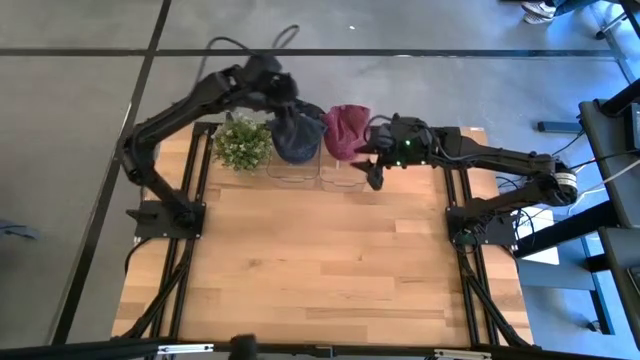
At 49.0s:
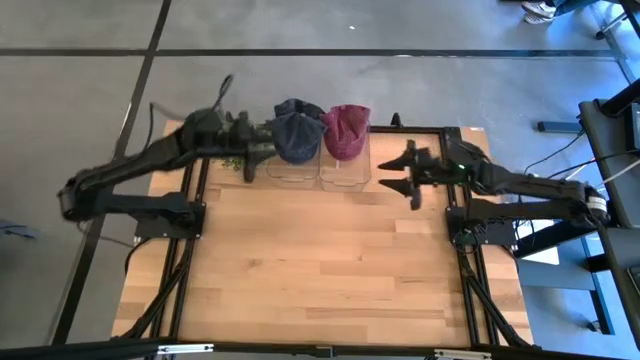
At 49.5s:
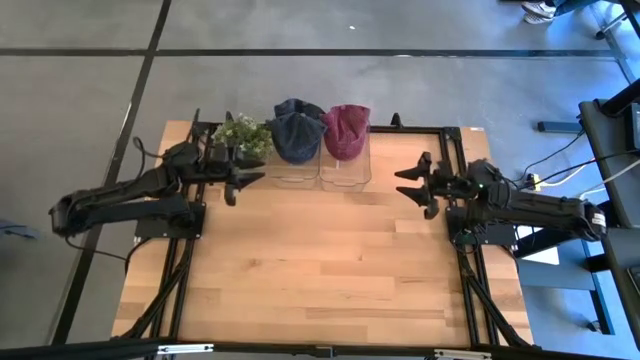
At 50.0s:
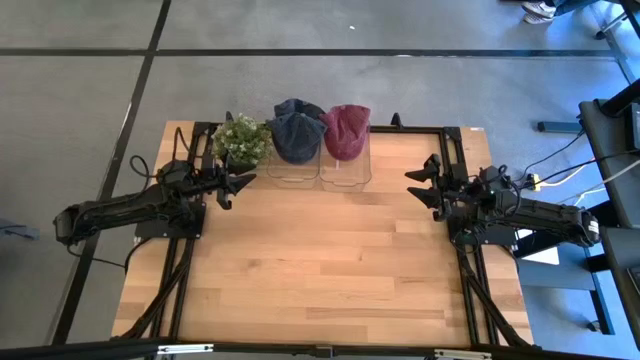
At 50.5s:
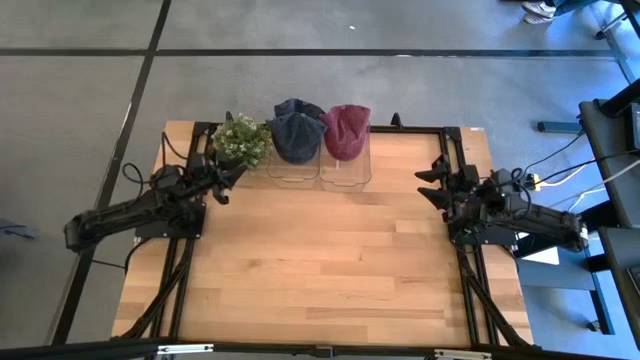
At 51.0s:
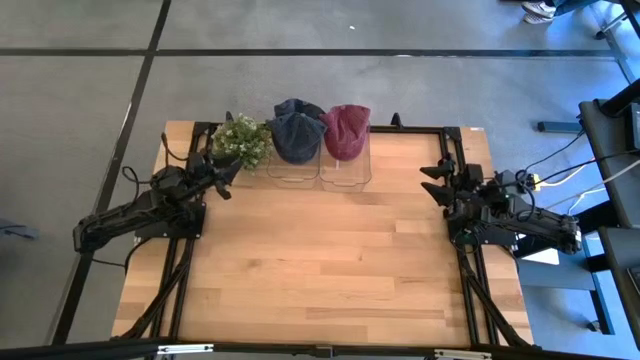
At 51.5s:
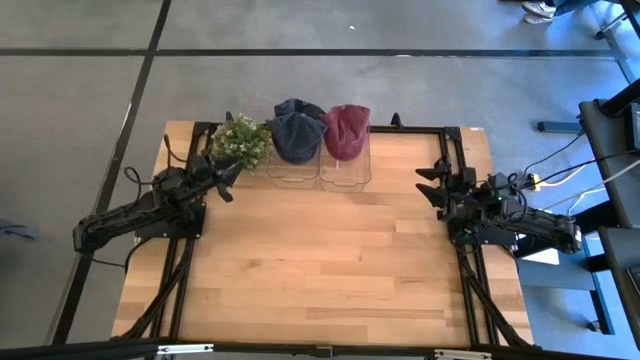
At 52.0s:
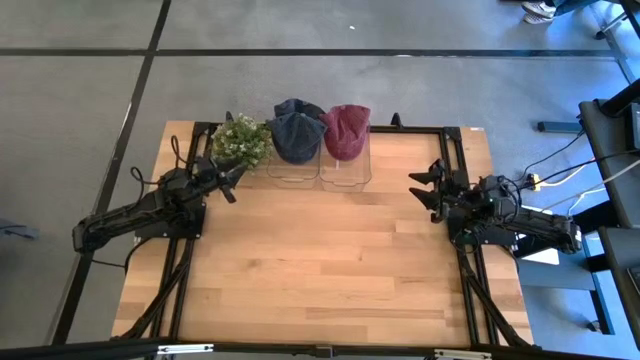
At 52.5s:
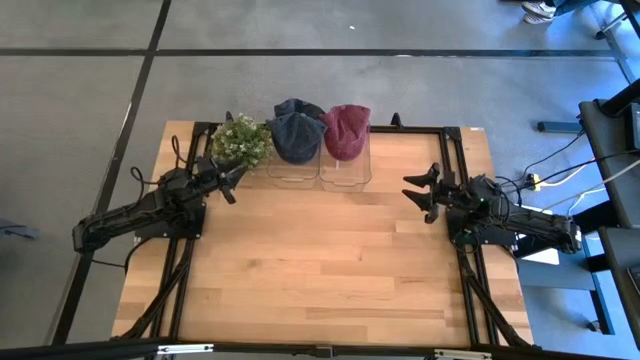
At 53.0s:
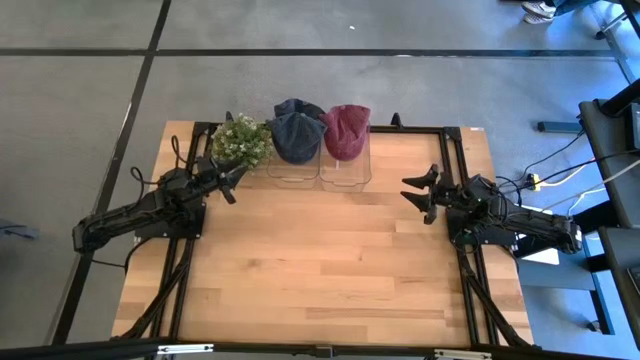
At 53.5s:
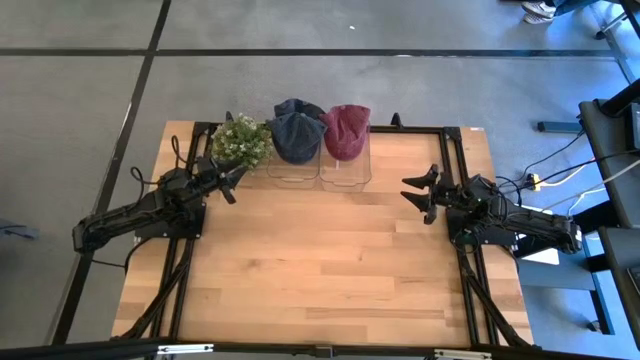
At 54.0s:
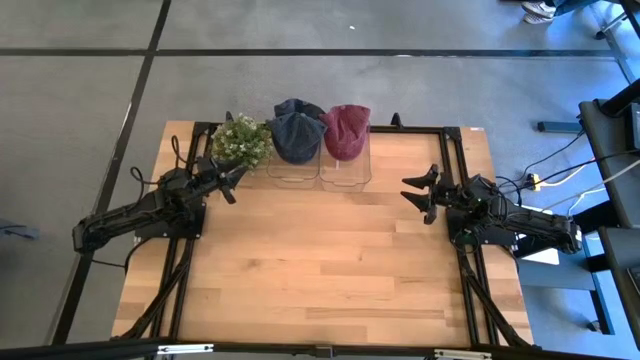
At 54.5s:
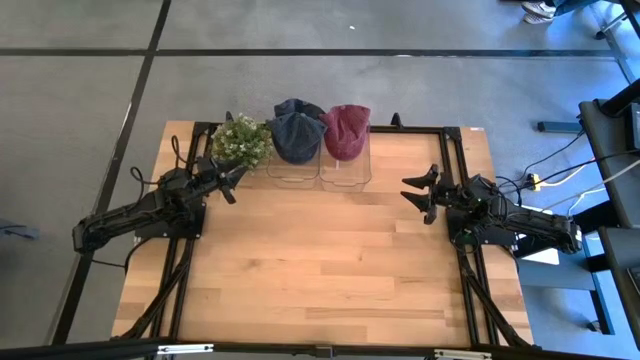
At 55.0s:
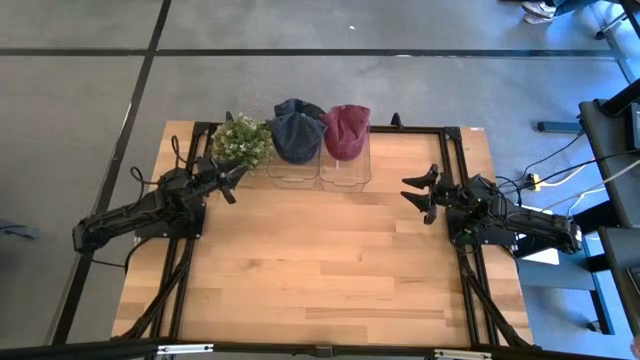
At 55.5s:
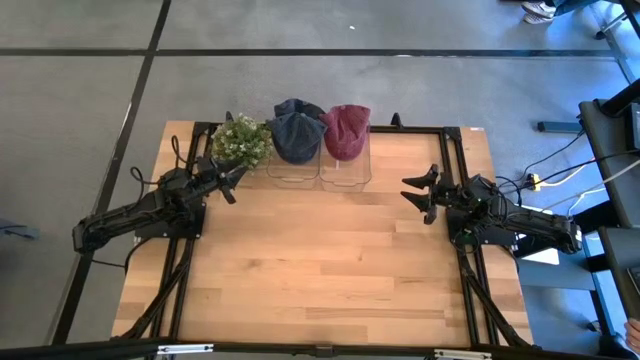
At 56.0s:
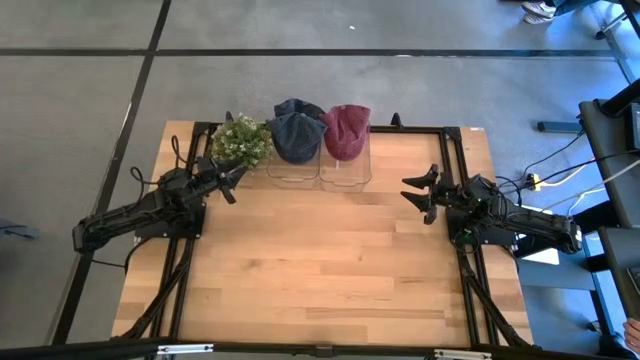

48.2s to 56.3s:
Task: Pick & Place hat
Return to Home Position

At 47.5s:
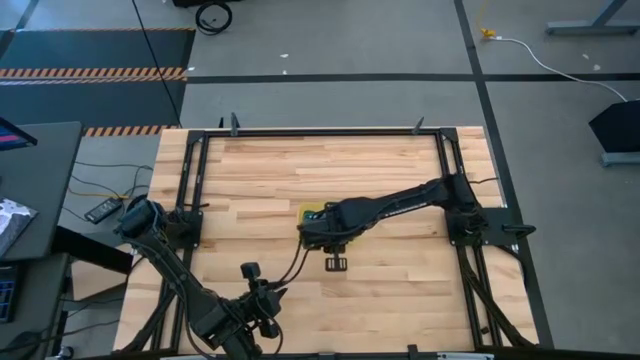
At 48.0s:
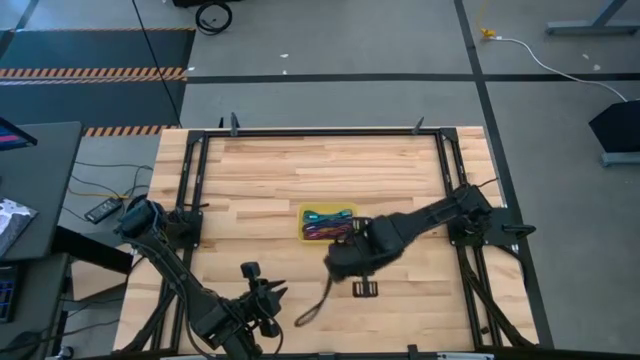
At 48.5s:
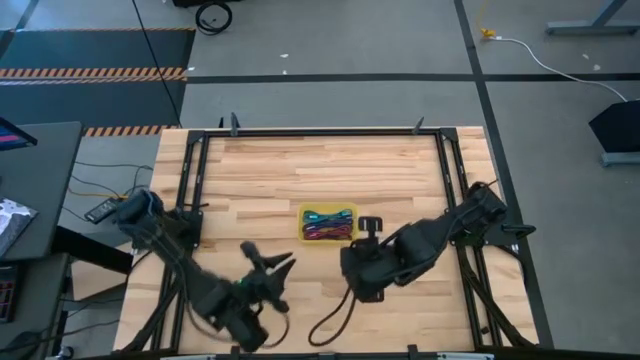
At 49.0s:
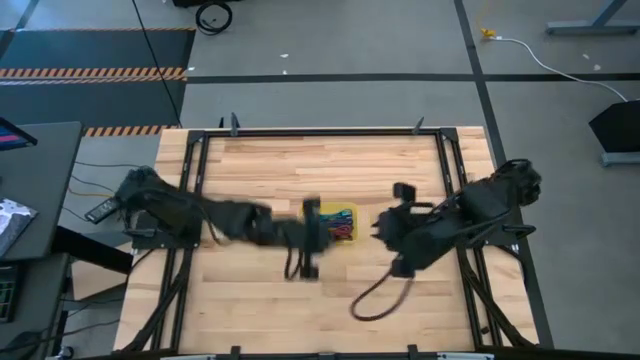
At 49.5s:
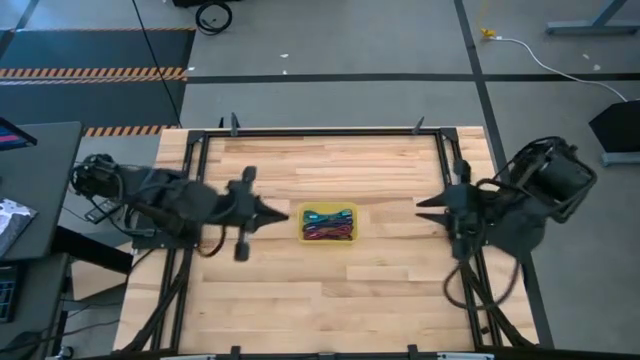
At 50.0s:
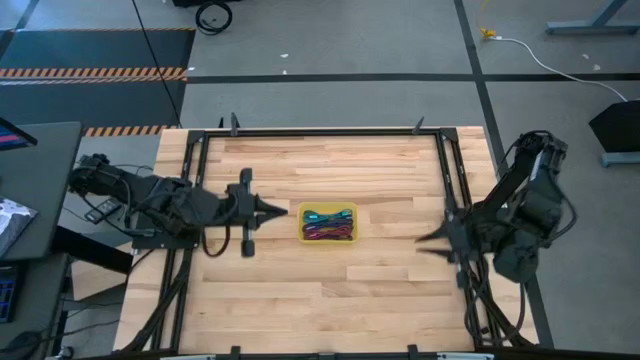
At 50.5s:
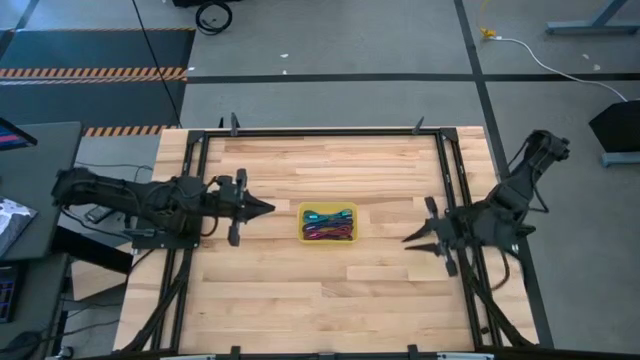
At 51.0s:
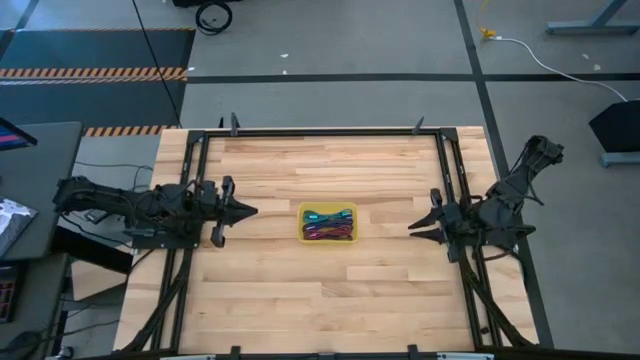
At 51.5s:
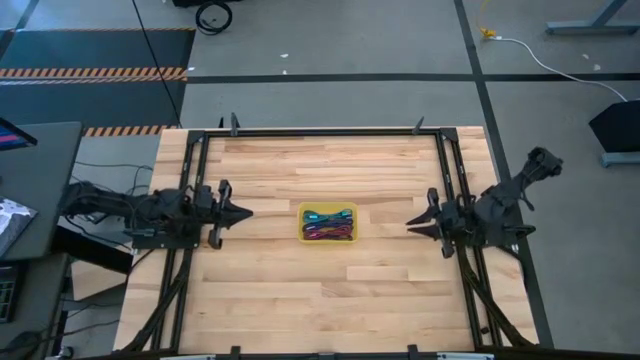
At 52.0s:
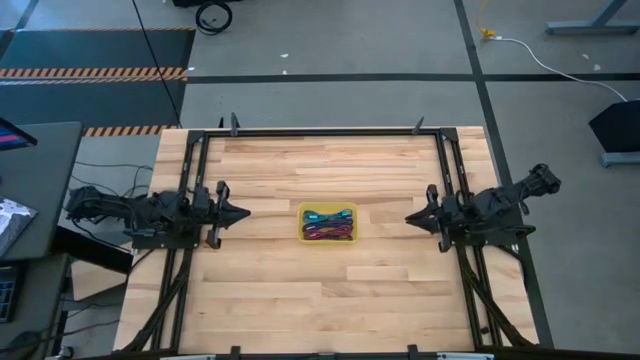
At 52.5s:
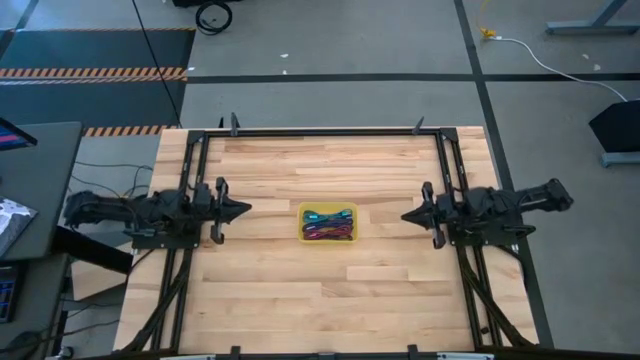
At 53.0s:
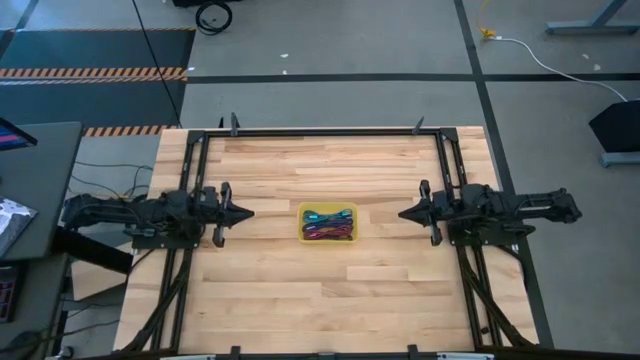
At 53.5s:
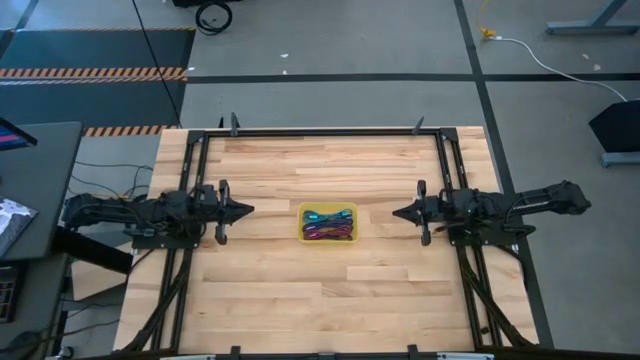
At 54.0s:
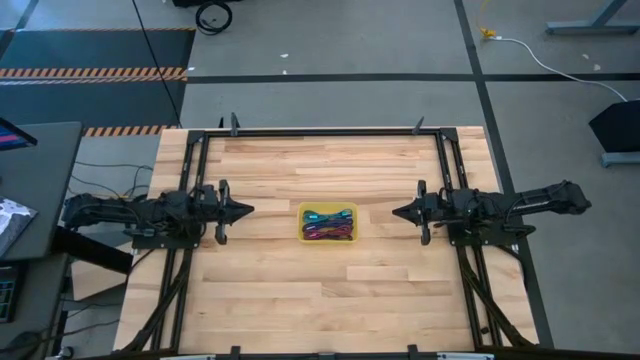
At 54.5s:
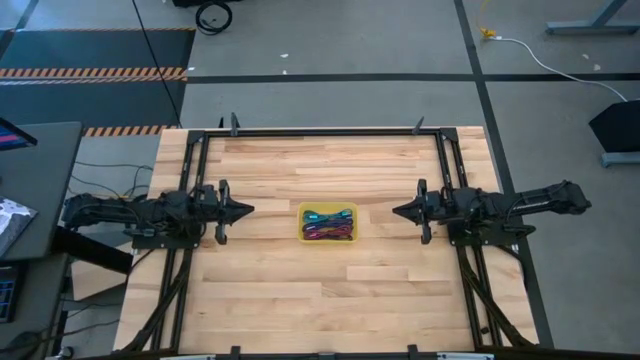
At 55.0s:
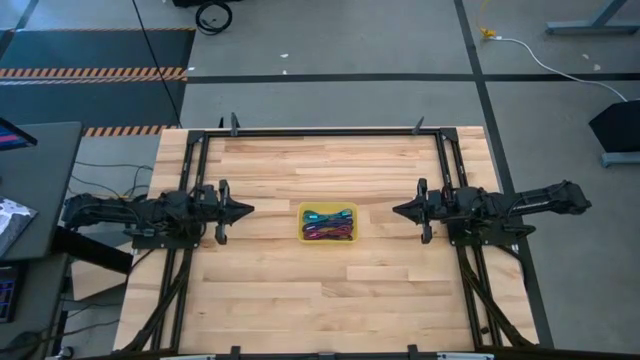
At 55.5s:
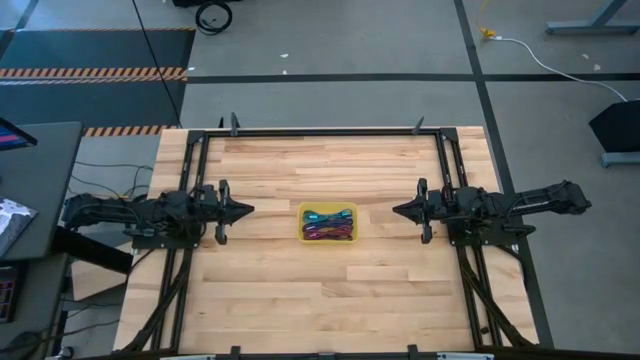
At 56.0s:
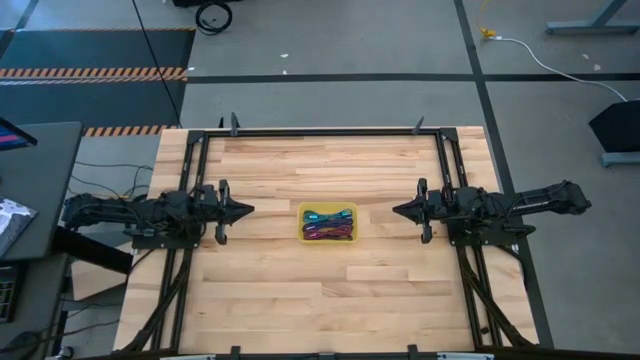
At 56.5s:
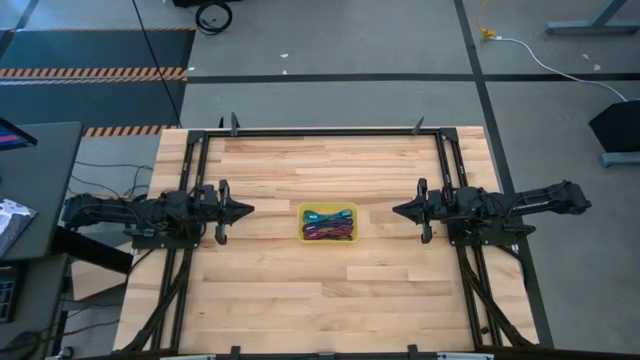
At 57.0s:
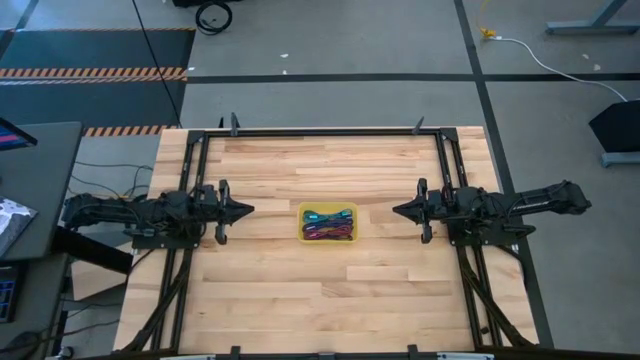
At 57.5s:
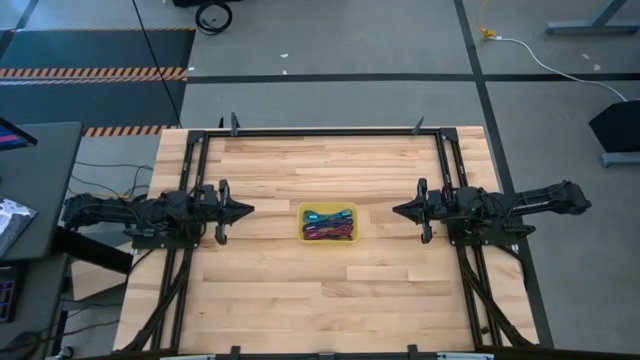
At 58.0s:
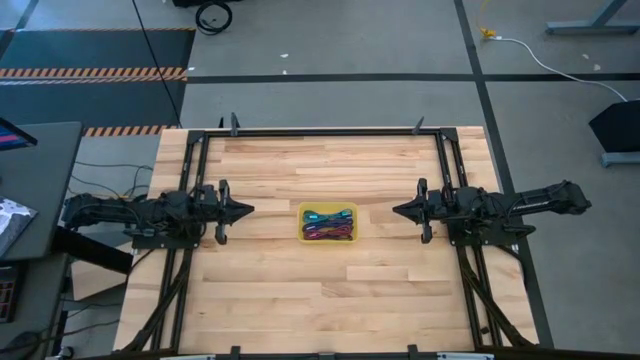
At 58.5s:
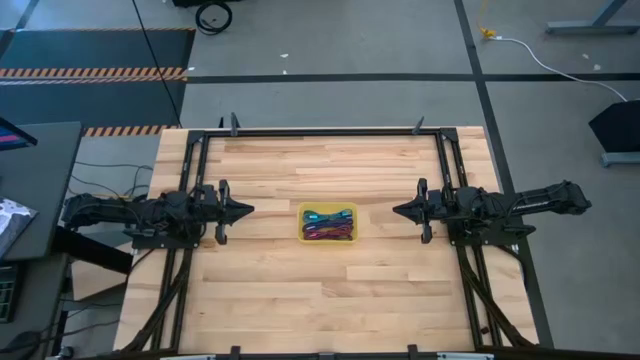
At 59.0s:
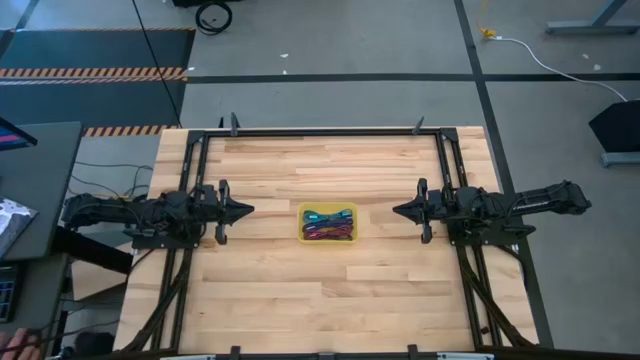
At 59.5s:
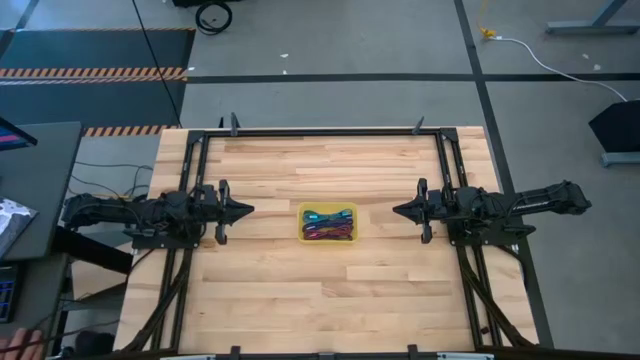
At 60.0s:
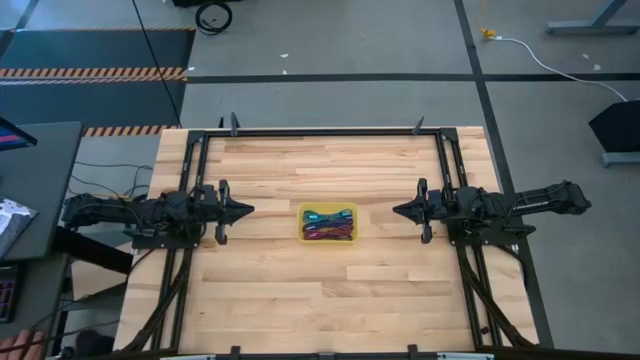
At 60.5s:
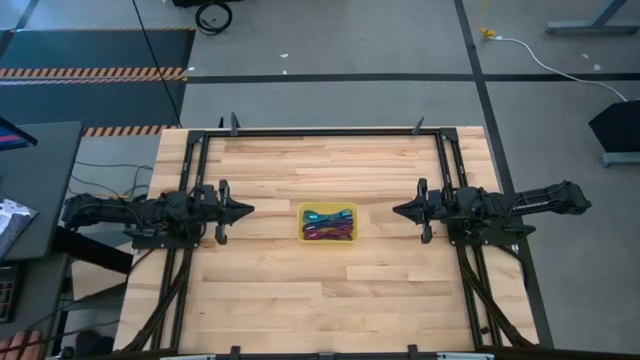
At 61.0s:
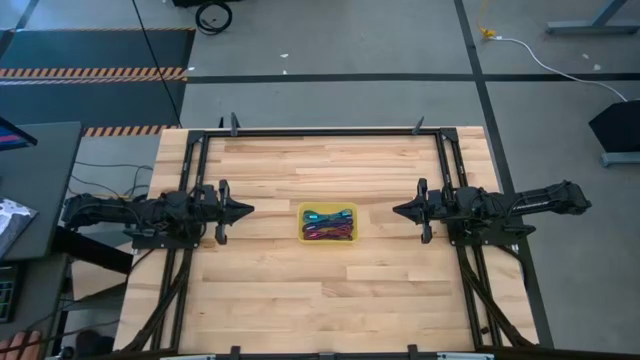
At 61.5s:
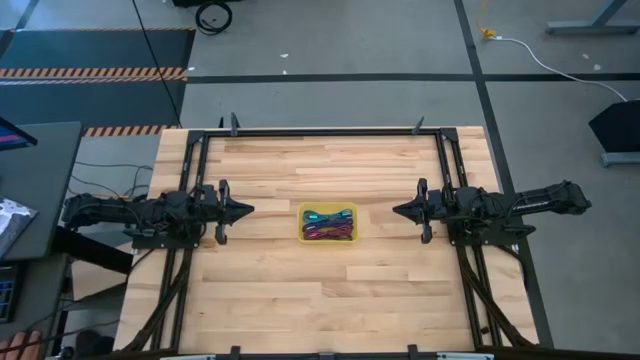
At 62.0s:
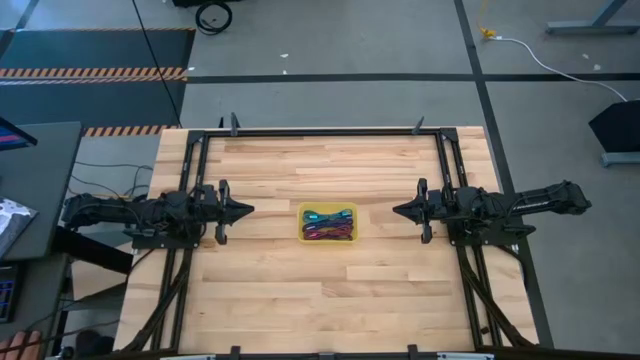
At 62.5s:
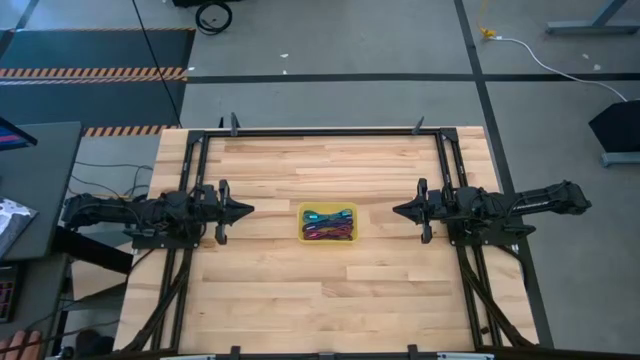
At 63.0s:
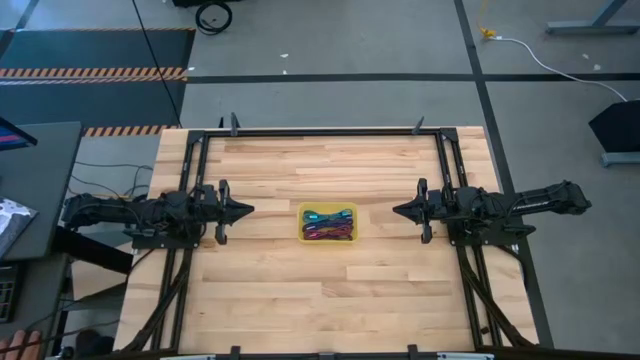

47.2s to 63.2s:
Task: Pick and place USB-C Cables
Return to Home Position
